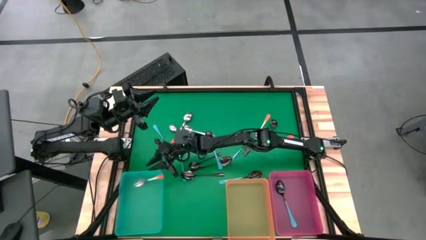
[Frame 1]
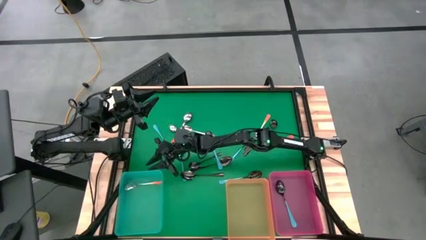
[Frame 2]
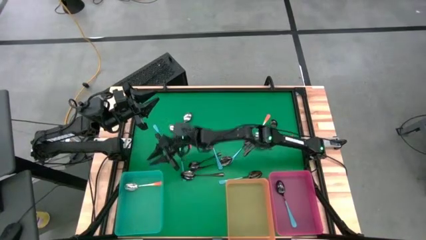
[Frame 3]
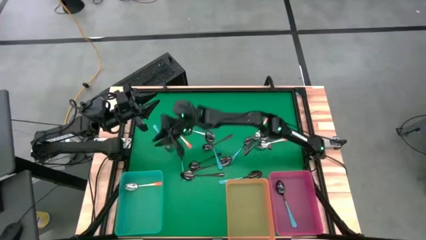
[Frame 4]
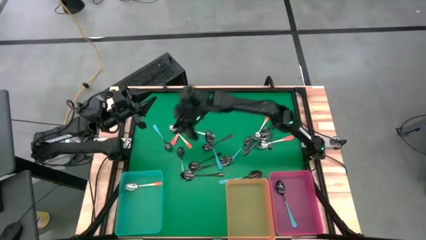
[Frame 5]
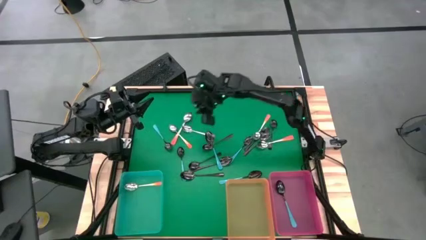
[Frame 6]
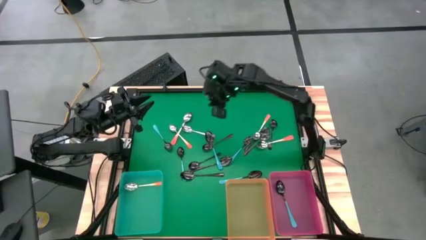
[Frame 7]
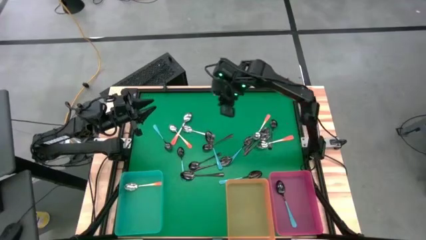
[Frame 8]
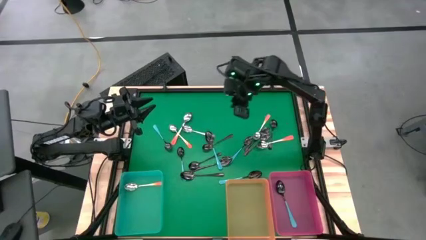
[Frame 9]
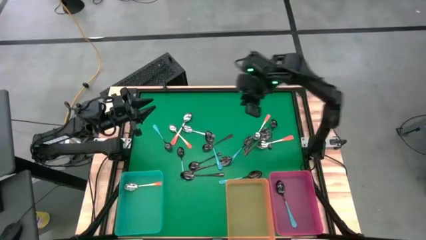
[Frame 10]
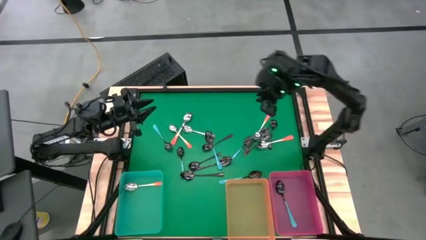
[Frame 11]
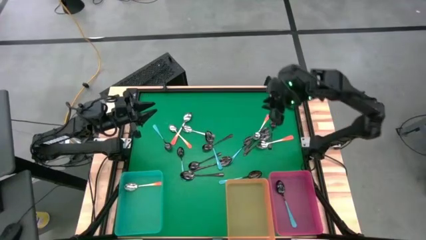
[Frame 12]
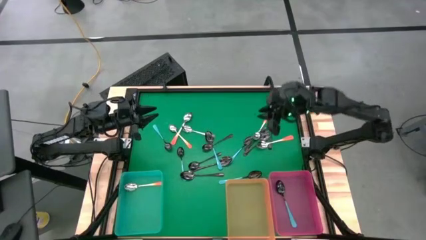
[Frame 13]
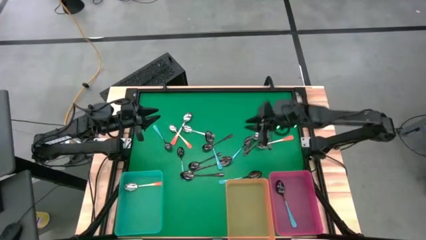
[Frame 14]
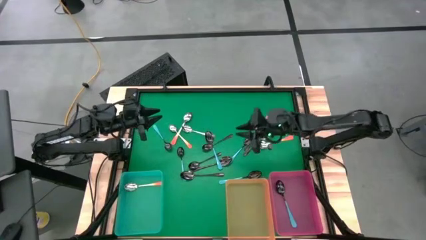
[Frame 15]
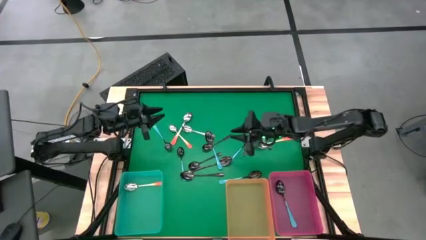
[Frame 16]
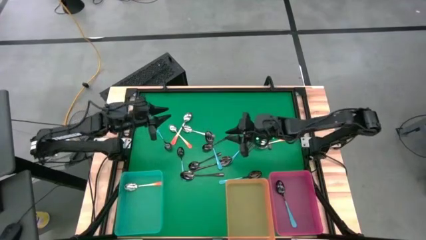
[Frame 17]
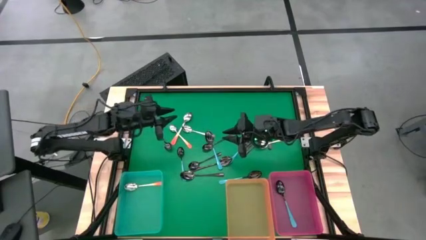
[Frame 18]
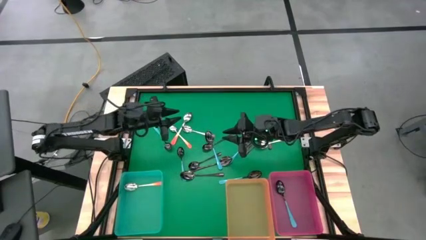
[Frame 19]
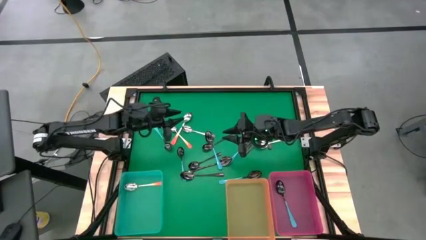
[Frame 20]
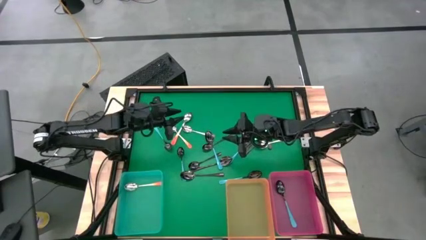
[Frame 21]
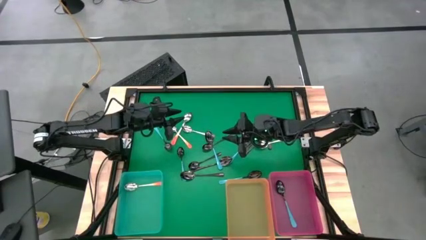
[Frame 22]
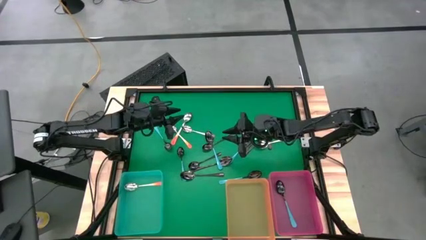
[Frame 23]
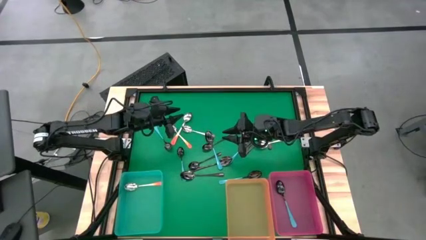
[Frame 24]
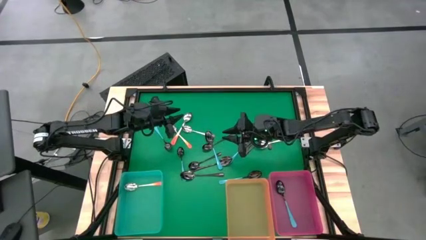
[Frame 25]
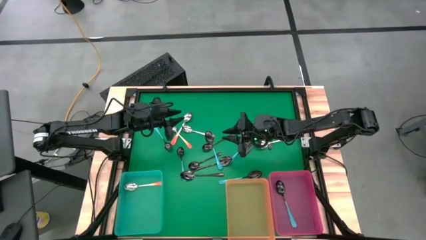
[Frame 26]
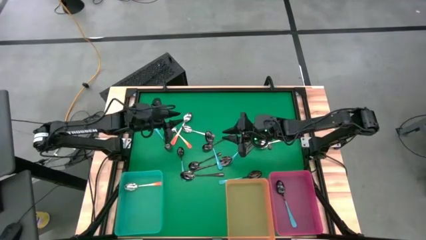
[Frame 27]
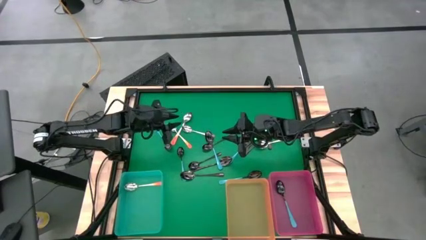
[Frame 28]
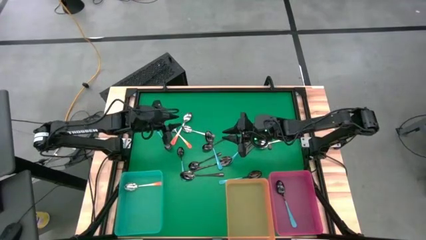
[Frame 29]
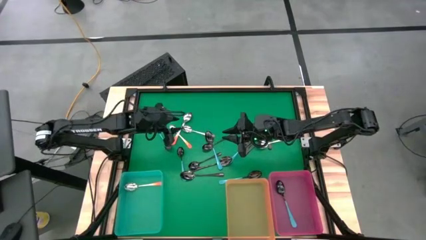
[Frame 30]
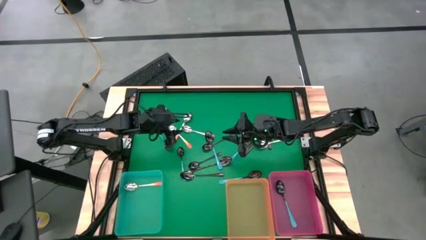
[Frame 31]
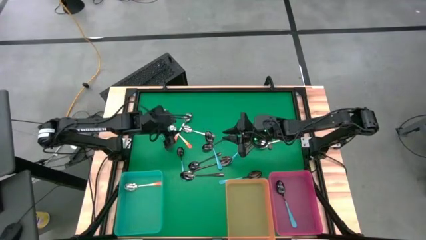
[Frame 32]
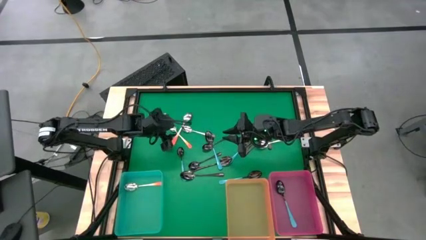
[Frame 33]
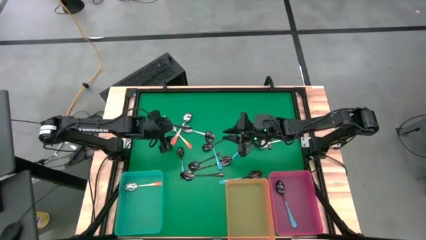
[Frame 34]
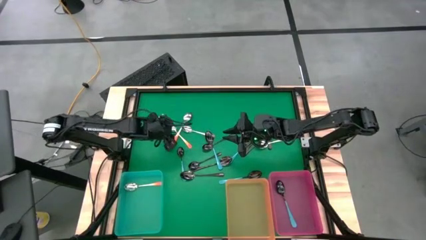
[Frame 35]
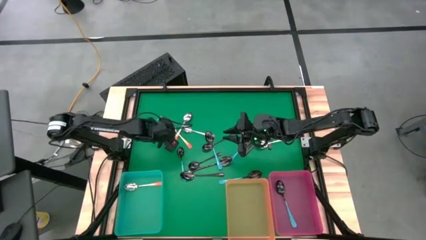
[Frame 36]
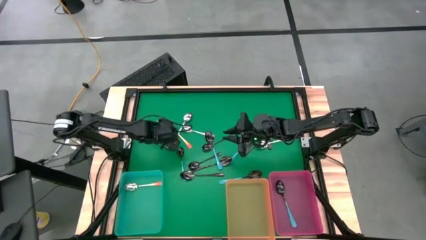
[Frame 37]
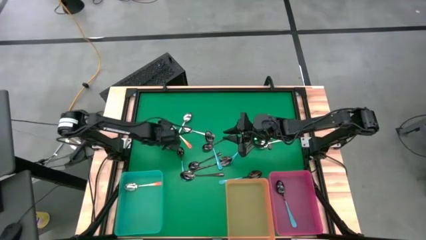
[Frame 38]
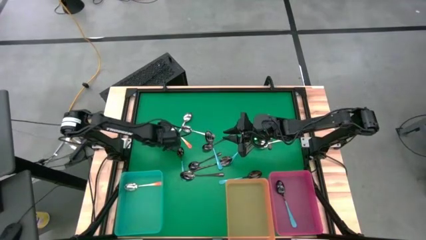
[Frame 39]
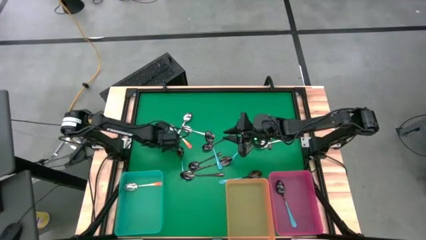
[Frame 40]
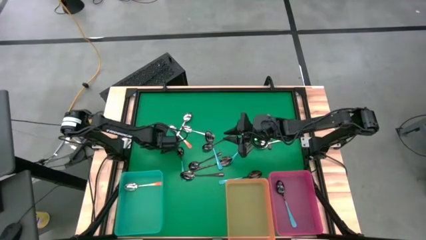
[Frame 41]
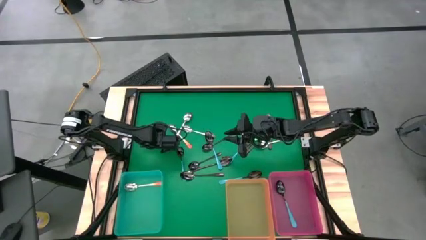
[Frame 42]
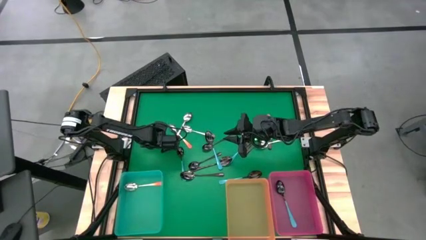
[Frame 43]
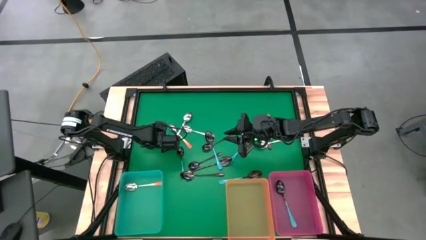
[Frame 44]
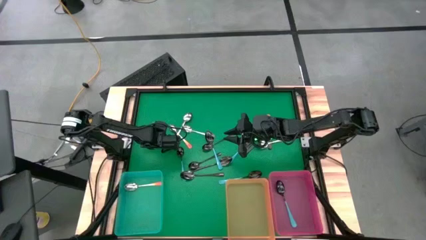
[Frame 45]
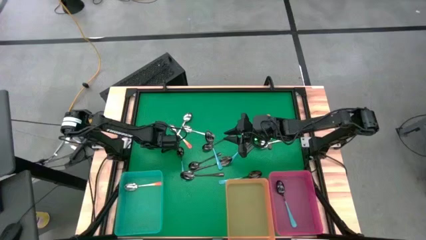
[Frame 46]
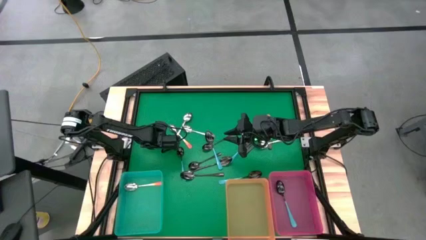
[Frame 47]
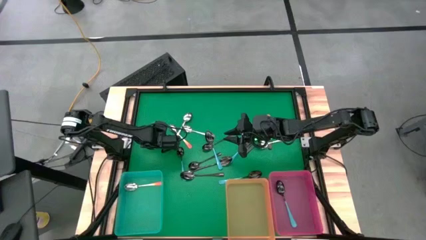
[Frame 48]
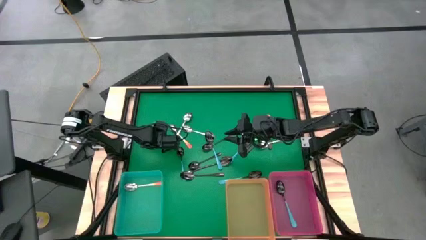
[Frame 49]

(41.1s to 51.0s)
Task: Sort silverware by color (type)
Put the black spoon into the orange bin

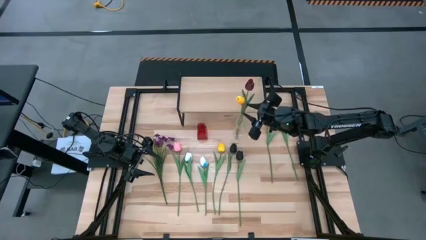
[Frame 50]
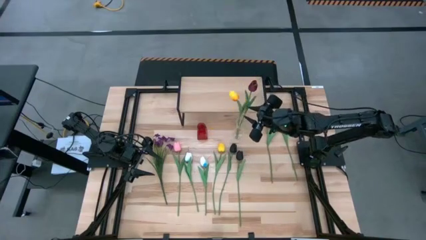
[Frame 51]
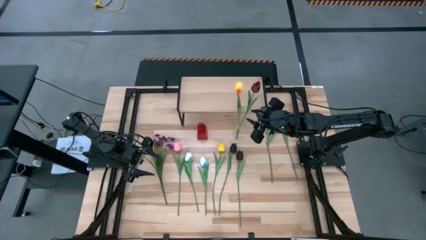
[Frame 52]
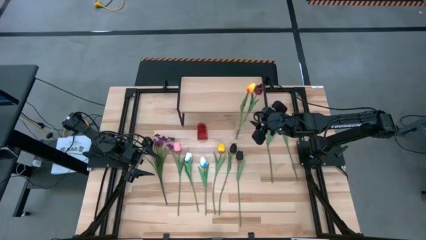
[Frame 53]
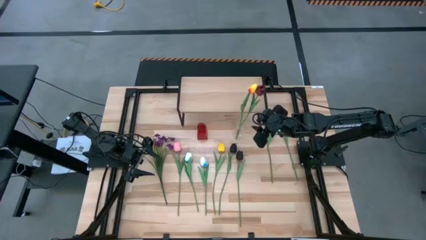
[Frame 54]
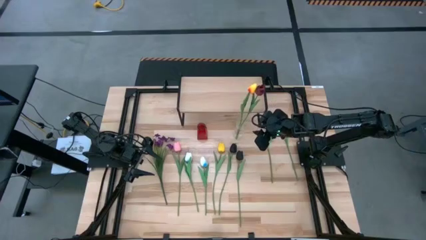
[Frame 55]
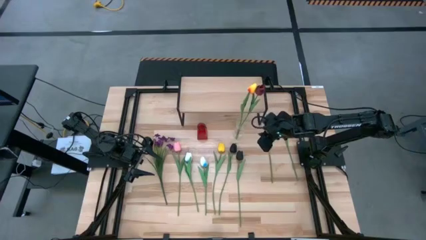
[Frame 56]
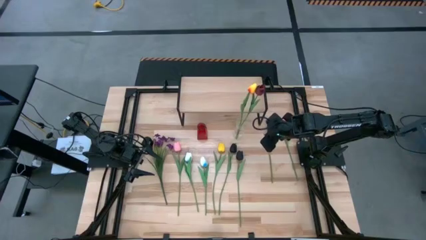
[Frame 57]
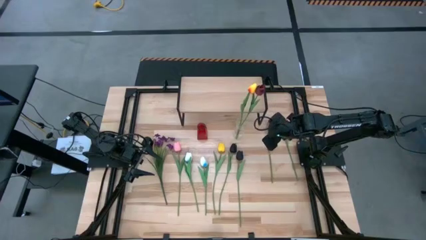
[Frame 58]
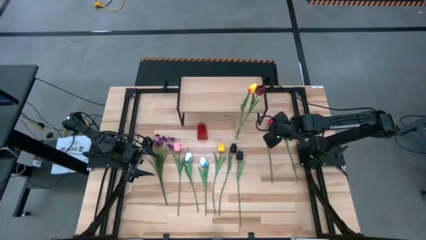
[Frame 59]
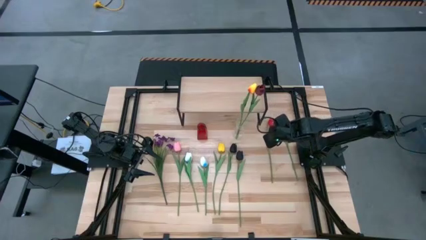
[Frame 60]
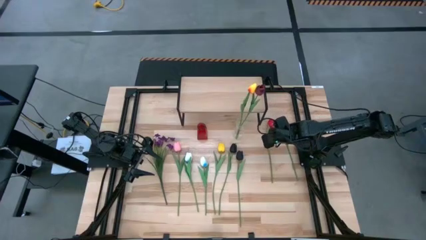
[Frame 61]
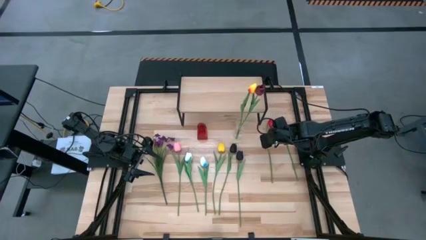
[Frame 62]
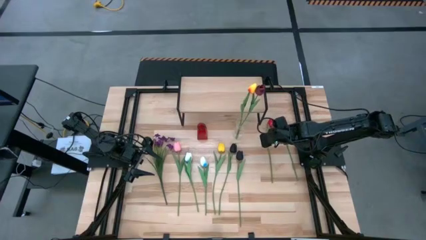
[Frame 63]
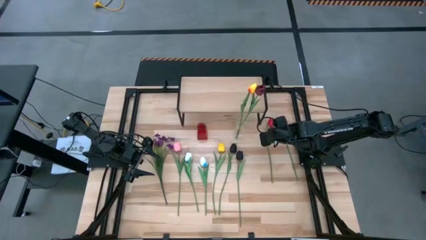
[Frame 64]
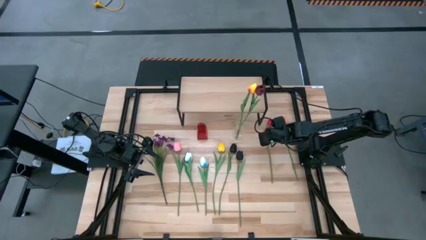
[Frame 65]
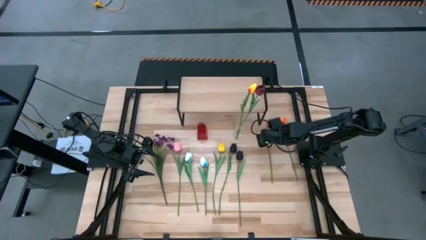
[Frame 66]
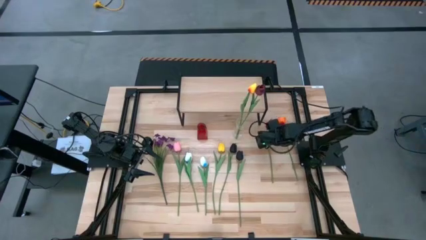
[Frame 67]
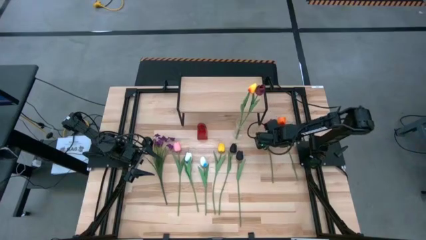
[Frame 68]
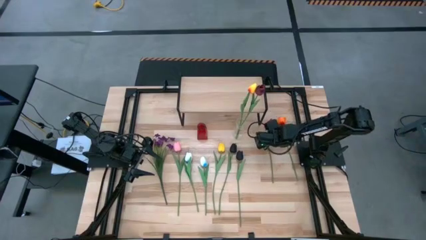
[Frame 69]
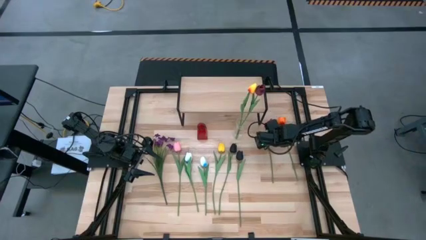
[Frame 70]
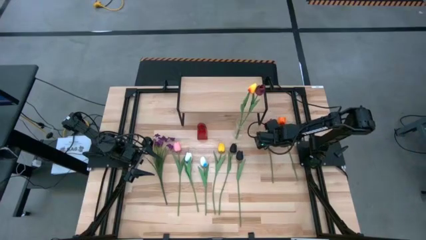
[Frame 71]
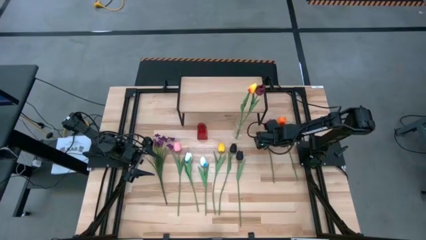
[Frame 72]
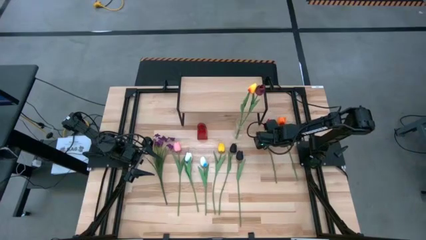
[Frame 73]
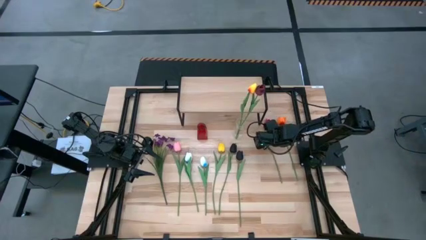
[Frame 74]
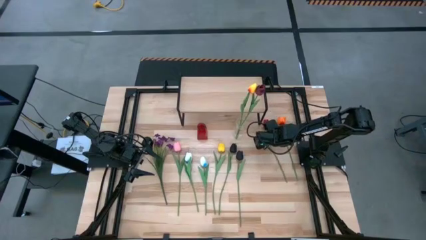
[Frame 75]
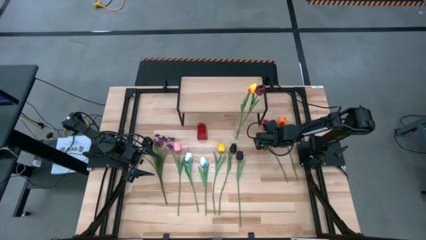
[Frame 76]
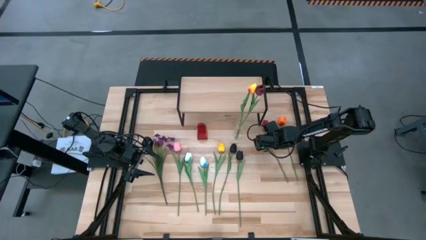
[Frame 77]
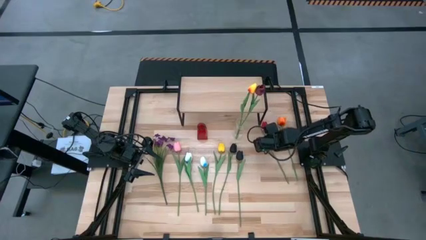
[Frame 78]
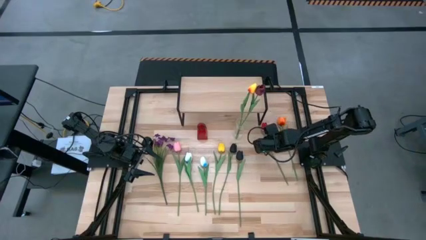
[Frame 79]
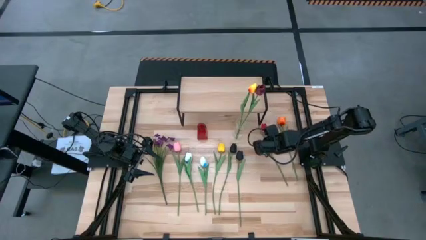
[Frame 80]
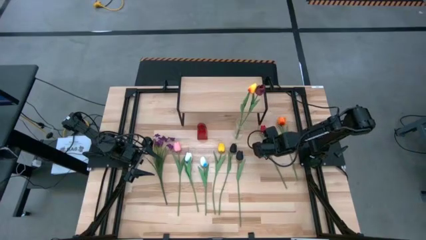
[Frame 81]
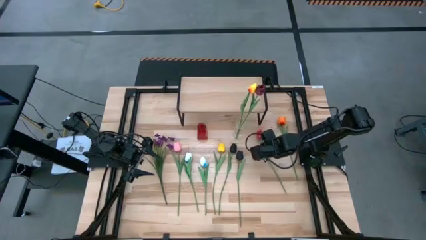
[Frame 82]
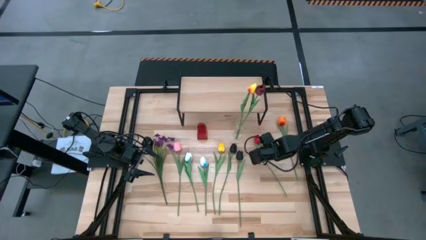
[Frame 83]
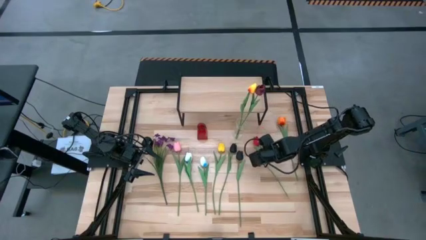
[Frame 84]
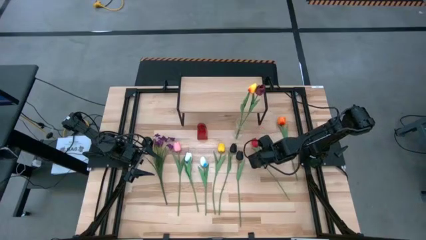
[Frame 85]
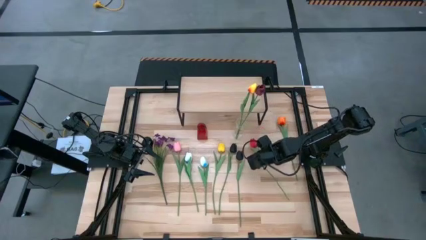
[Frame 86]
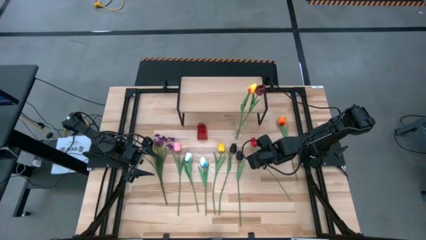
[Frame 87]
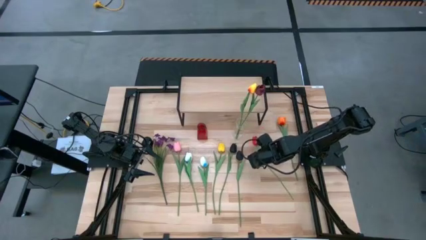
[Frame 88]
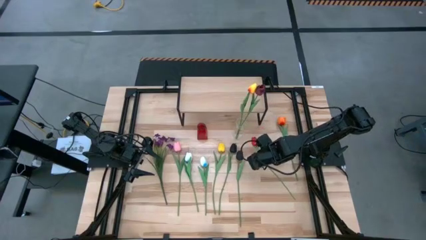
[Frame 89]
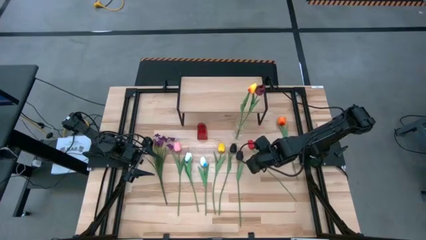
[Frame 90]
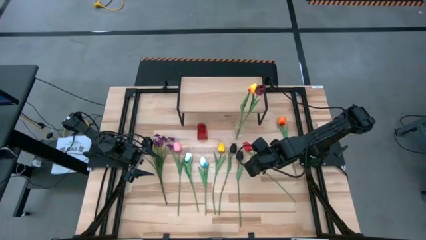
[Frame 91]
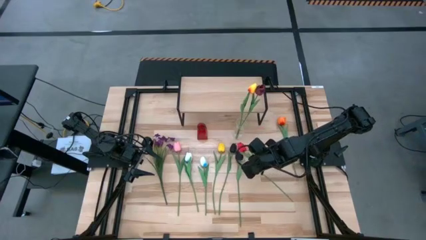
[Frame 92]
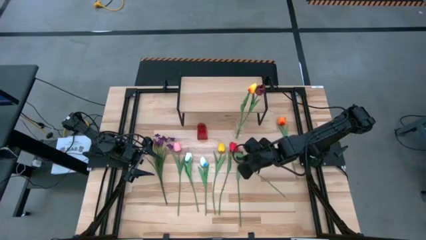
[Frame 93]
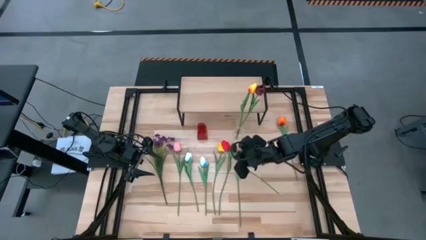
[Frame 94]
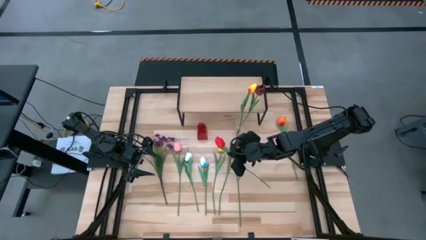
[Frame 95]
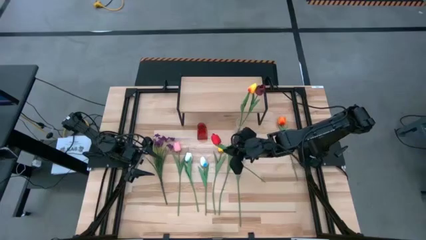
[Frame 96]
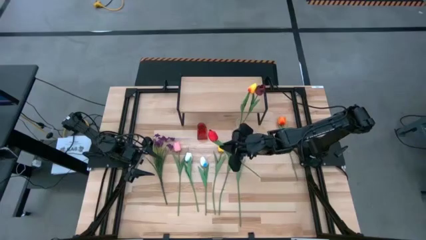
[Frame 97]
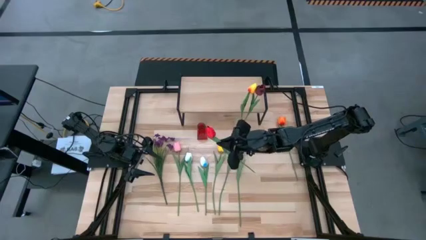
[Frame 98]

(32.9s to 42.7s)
Task: Pick and place flowers into a vace then onto a shelf
Put the red flower into the transparent vase
